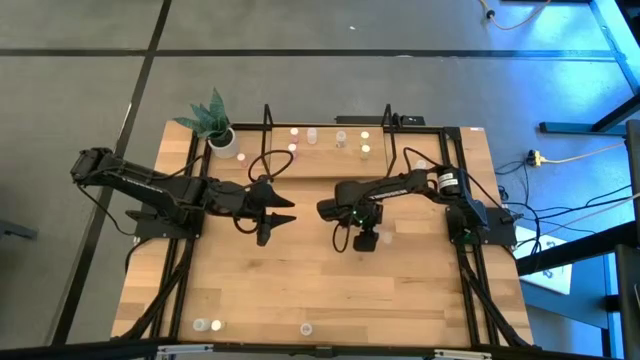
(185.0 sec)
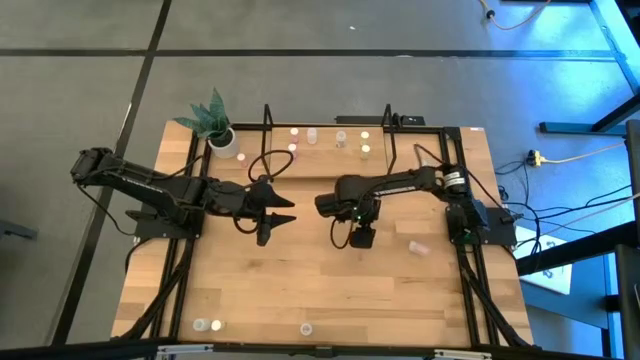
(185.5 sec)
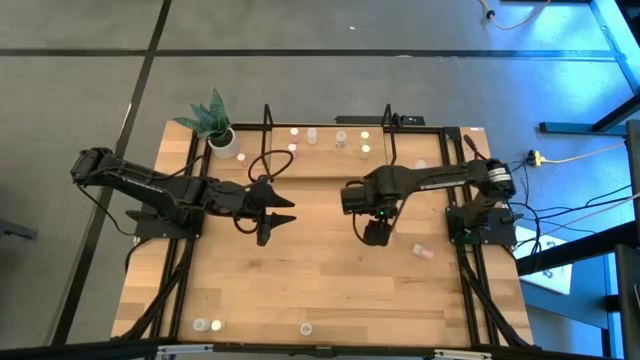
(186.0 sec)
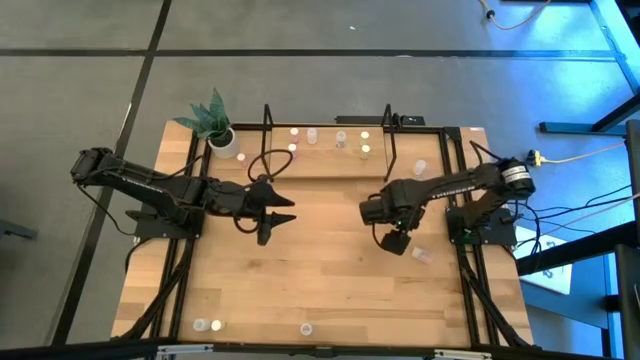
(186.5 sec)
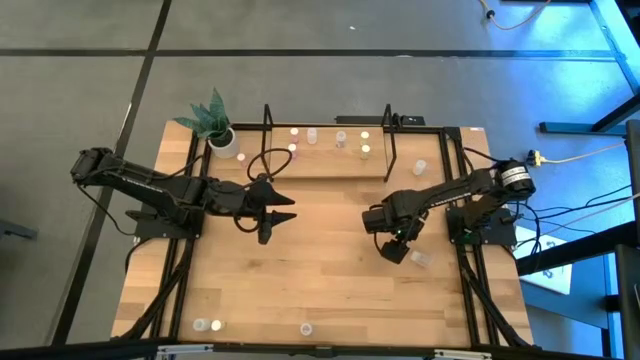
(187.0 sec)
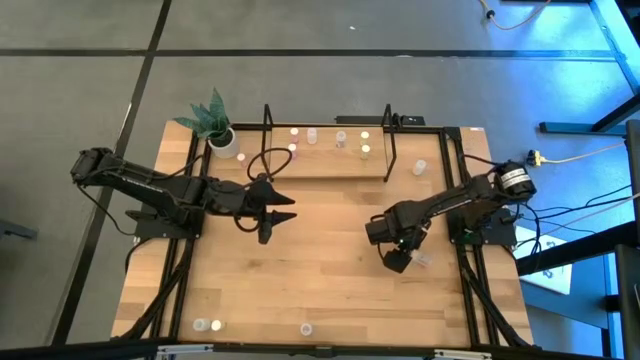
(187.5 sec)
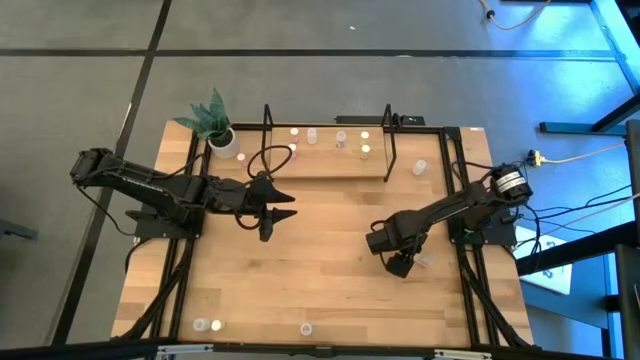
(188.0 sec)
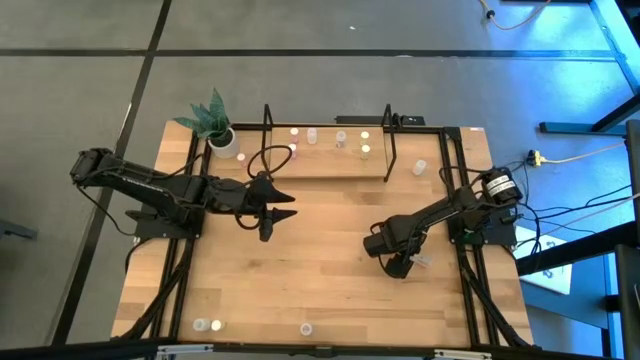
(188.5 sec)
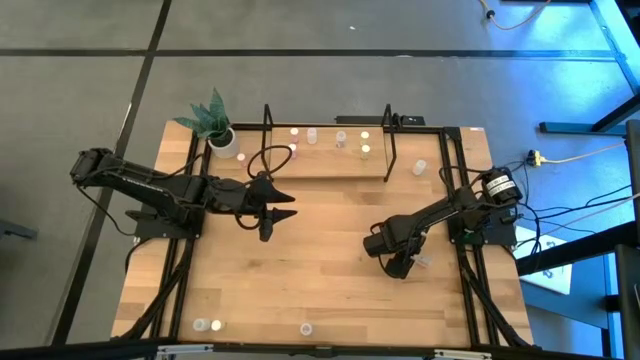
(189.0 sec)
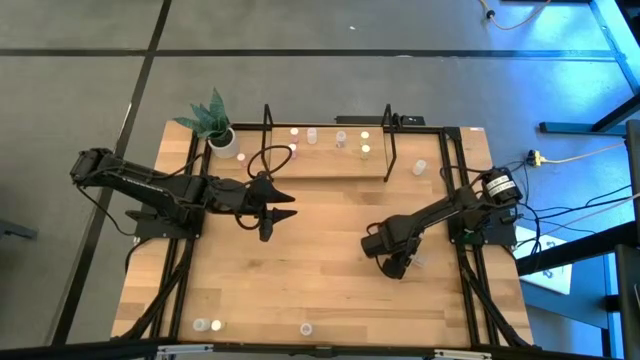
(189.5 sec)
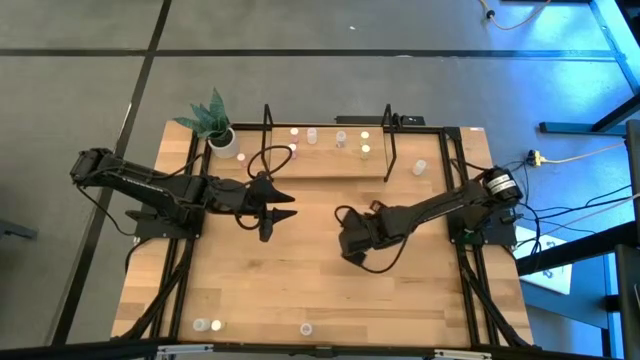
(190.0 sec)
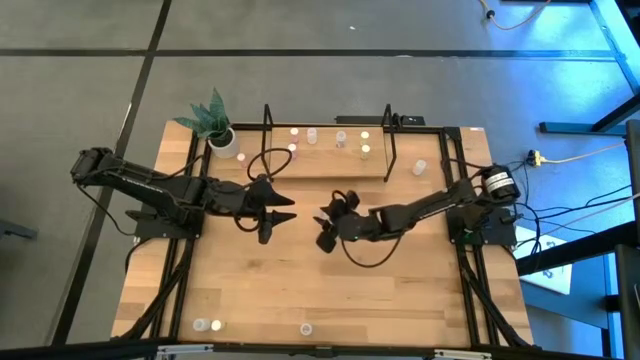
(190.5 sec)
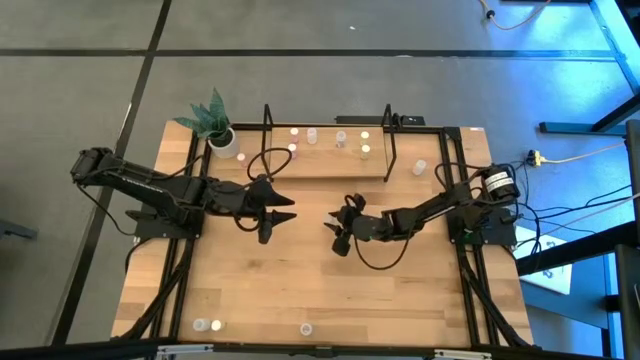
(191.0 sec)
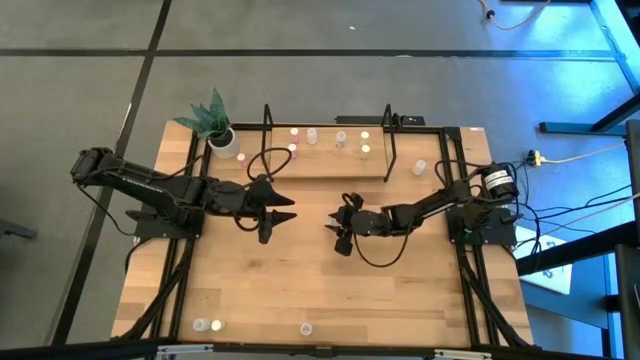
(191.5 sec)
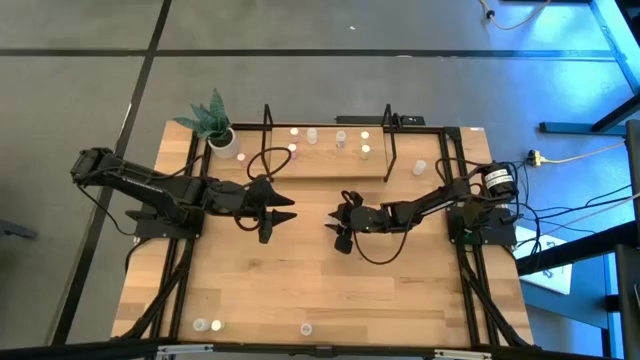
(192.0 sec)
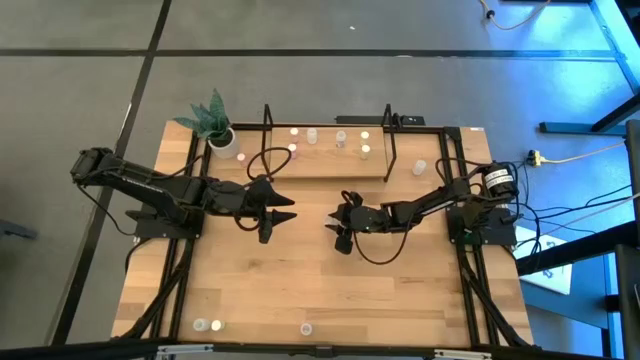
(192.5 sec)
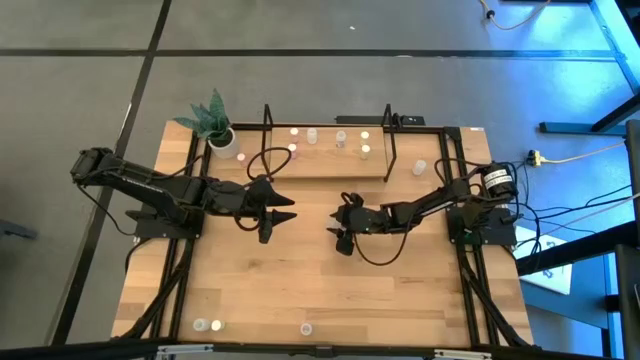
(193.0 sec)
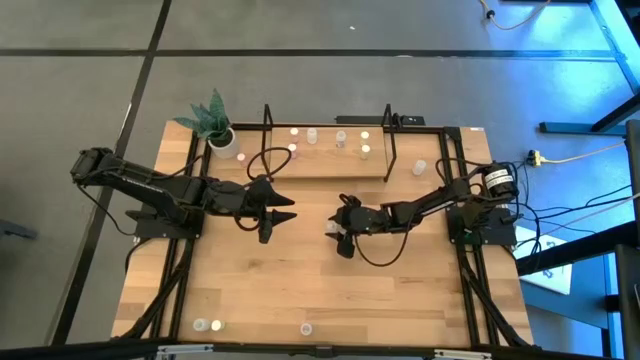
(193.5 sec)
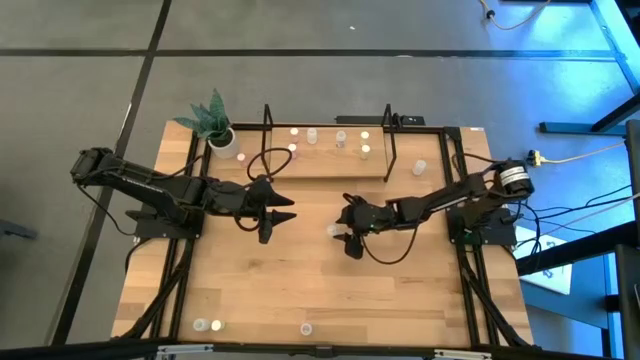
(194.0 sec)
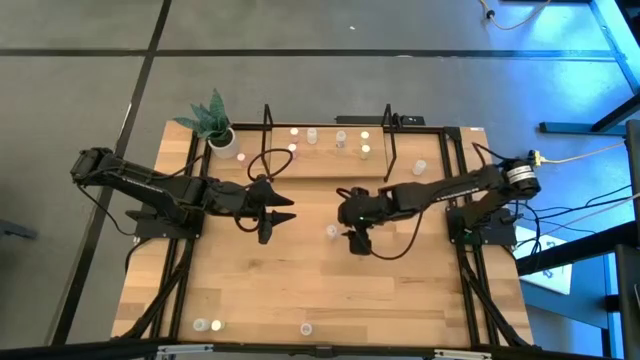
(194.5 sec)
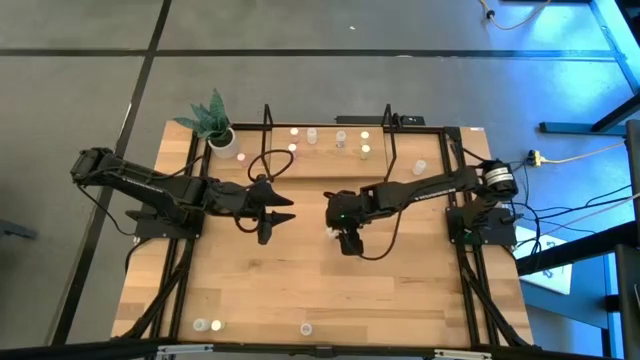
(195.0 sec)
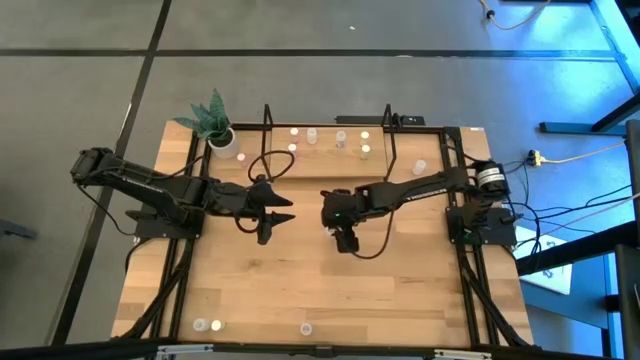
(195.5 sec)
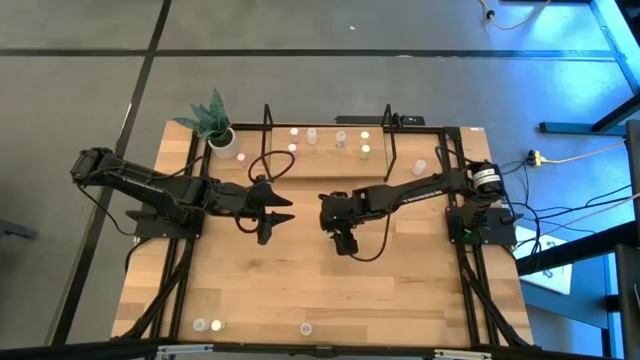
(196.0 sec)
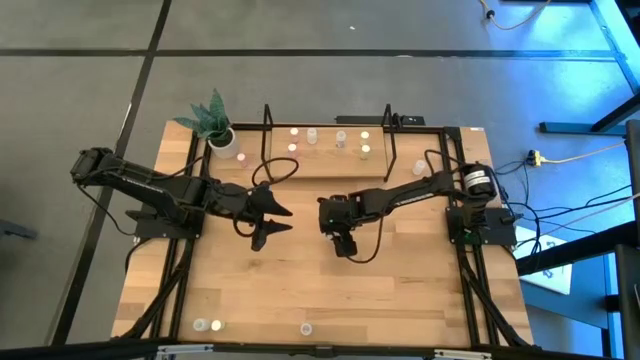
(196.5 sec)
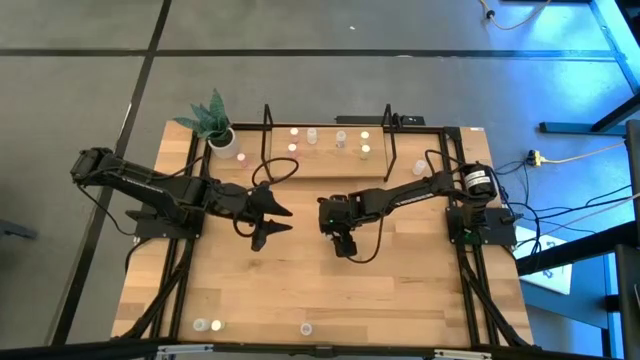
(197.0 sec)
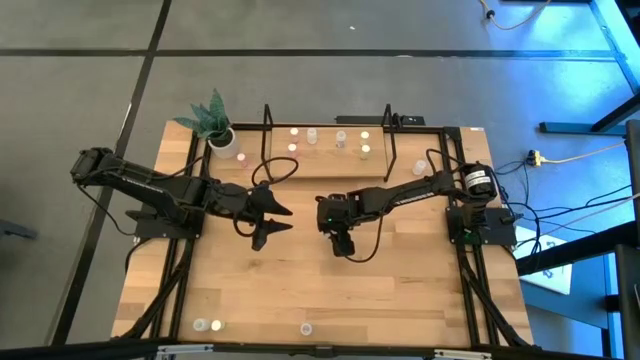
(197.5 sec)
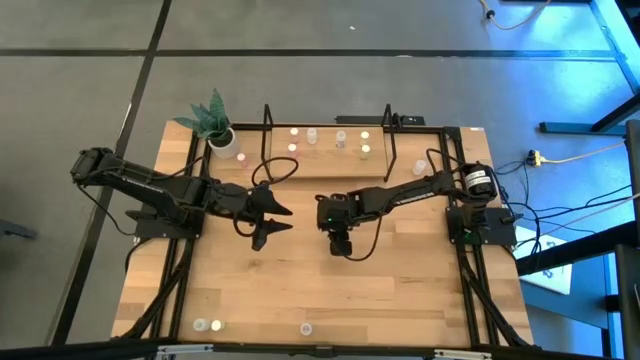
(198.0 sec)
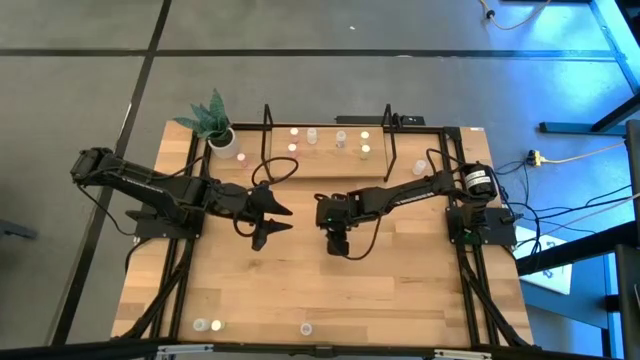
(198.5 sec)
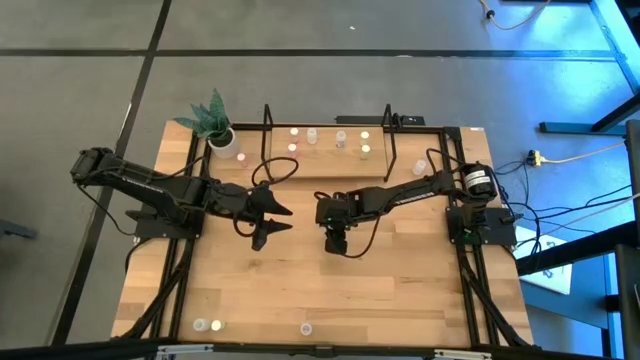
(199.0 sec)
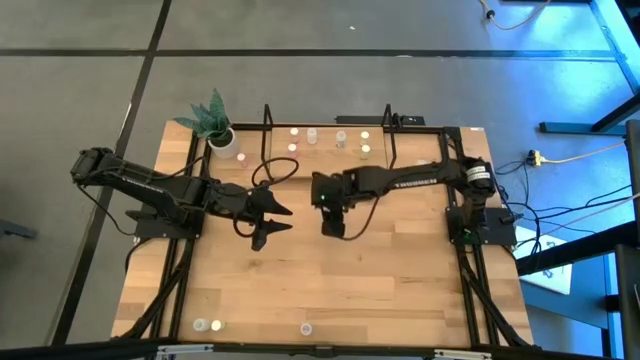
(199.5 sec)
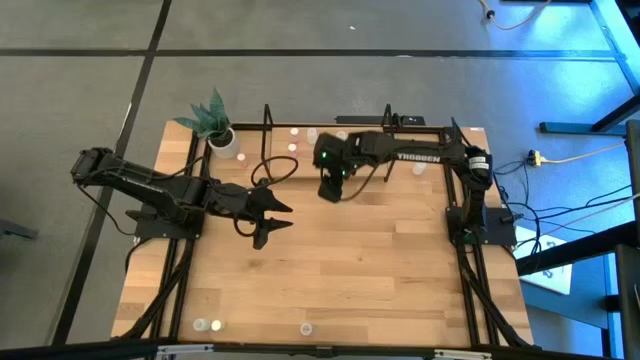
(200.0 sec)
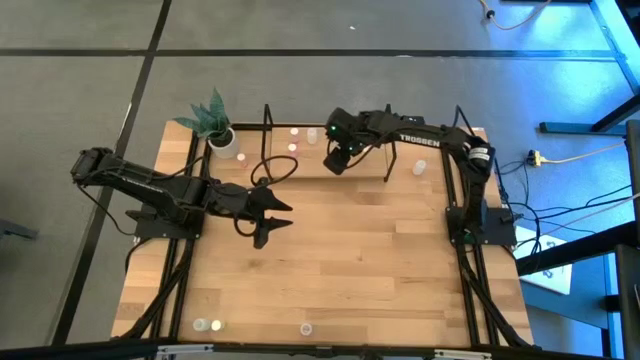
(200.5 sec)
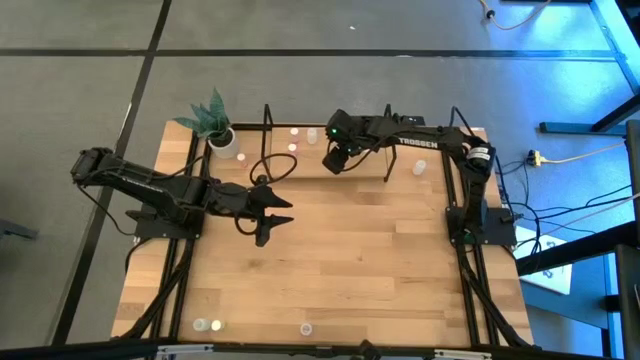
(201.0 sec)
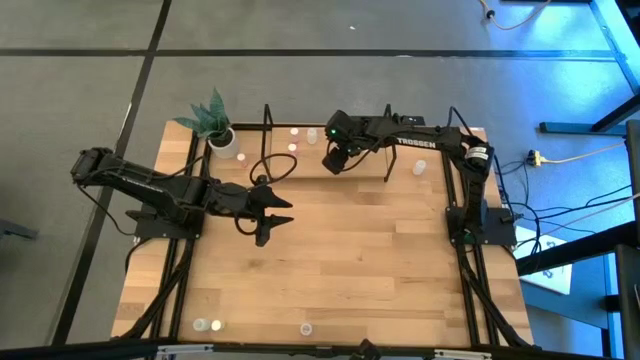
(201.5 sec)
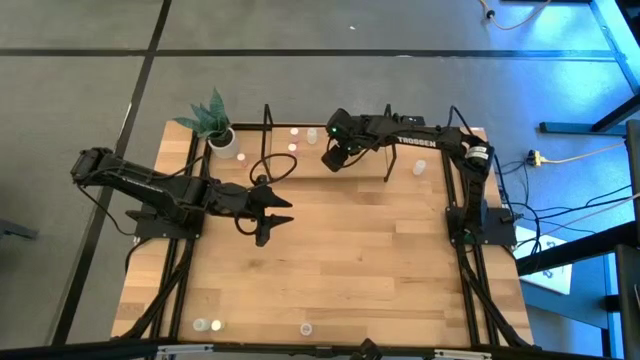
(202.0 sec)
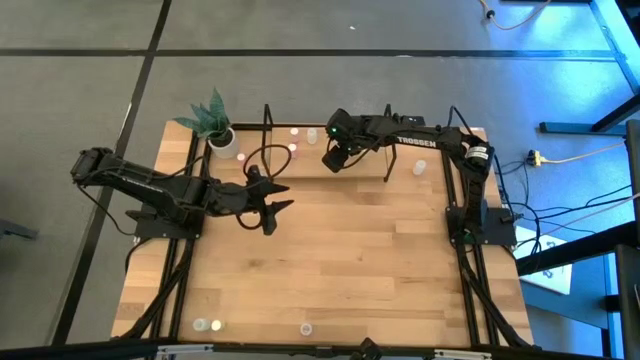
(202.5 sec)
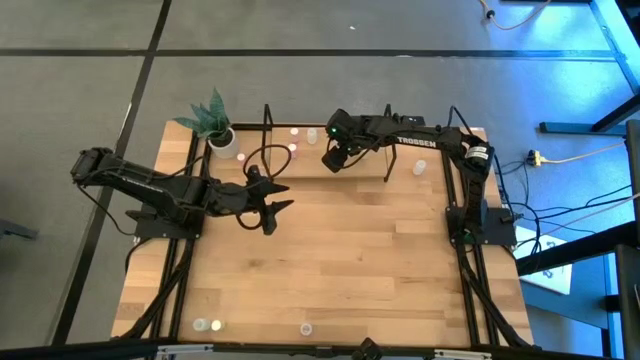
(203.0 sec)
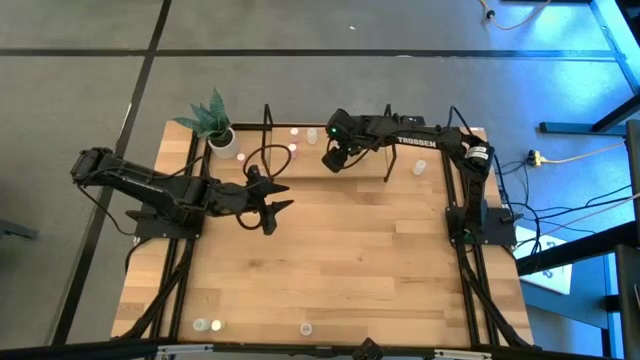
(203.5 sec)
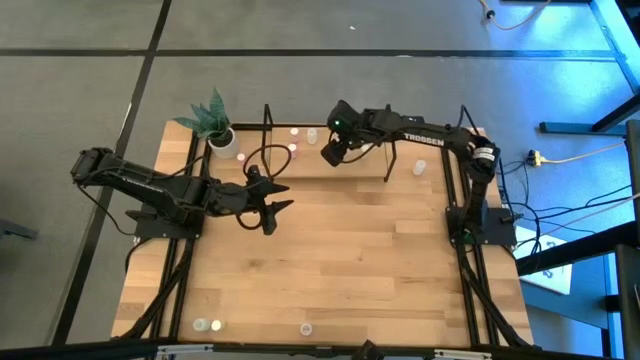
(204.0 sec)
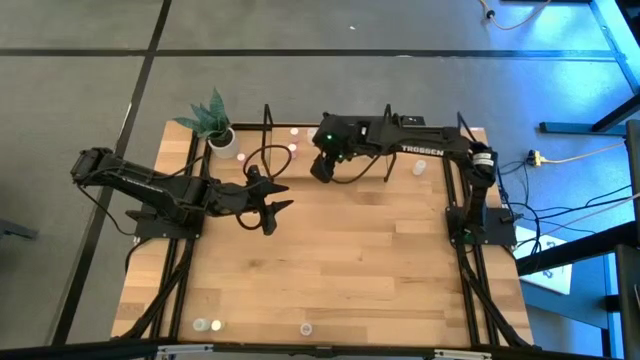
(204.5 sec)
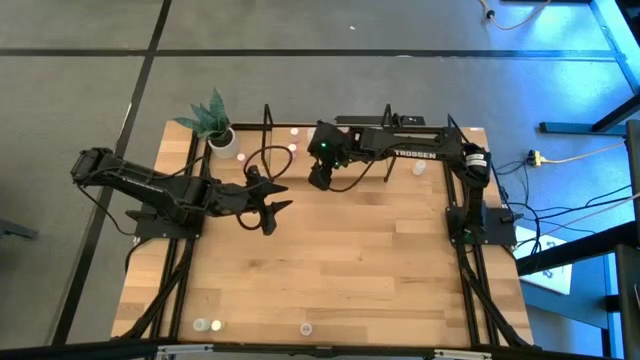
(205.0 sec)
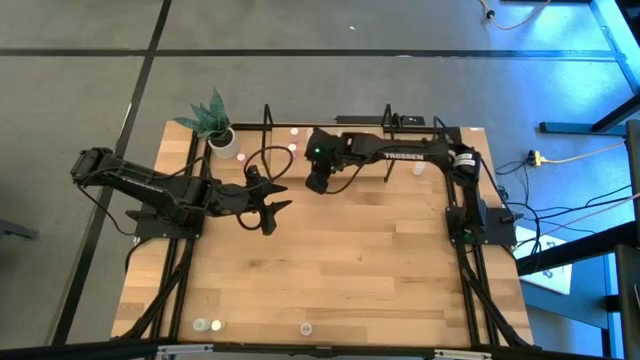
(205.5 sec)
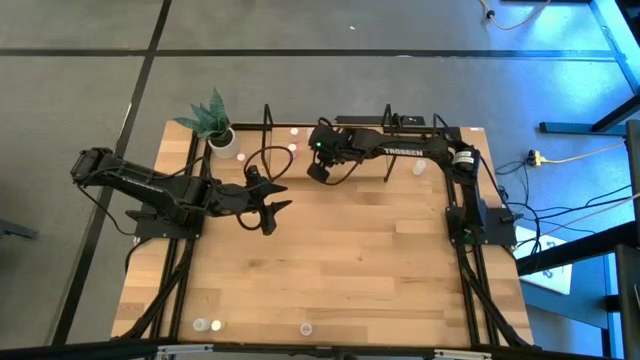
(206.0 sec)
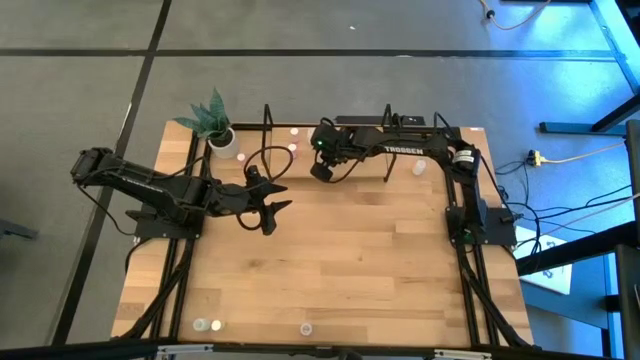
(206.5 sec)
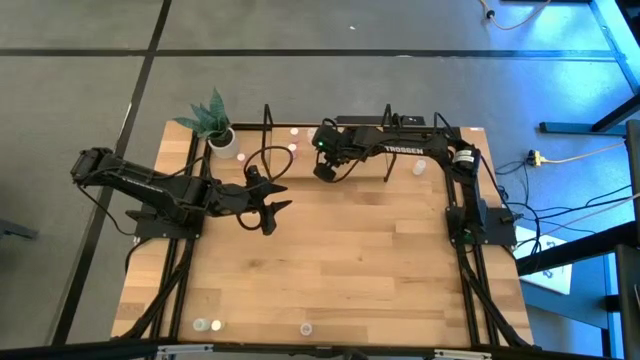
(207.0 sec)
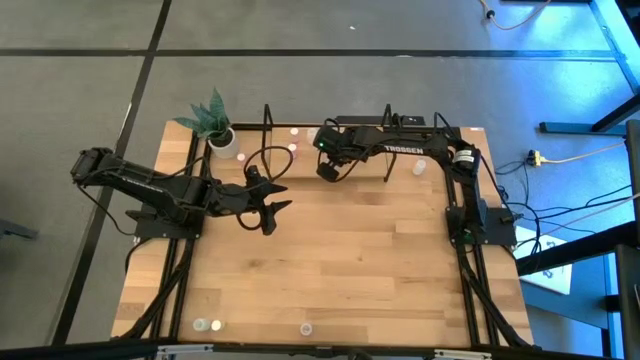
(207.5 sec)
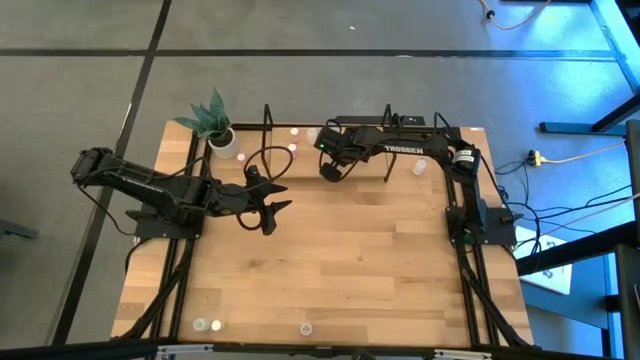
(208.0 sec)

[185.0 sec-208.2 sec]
Task: Pick and place medicine bottles onto shelf by color
Put the top transparent pill bottle on the shelf aligned with the other transparent pill bottle
